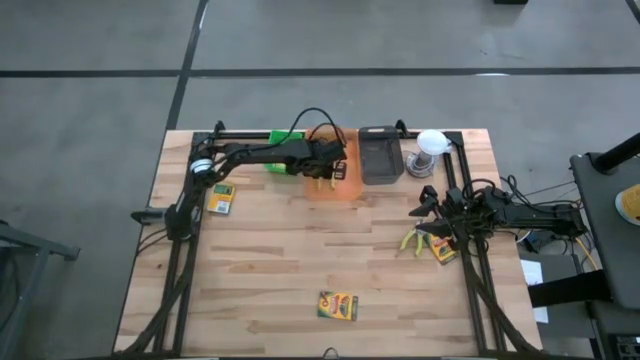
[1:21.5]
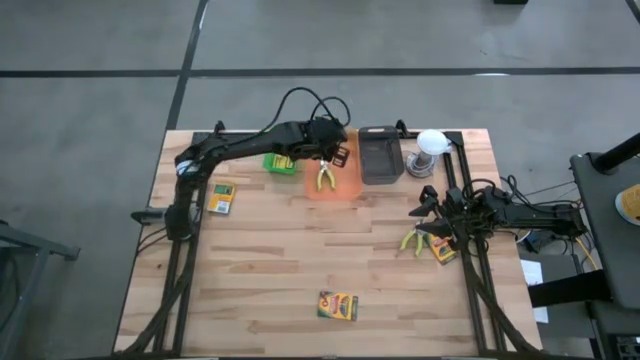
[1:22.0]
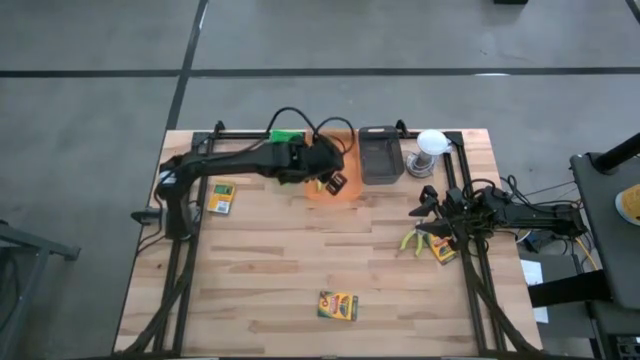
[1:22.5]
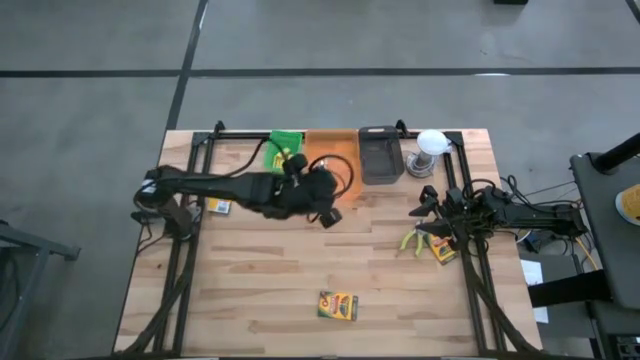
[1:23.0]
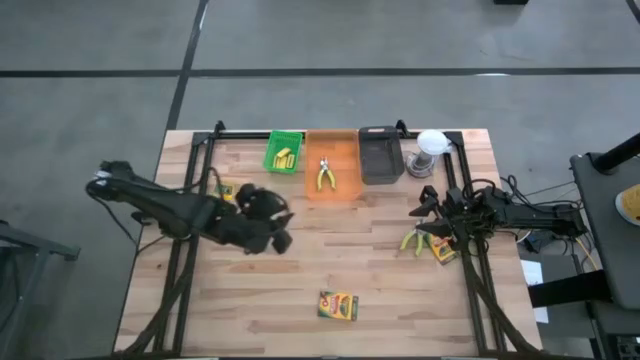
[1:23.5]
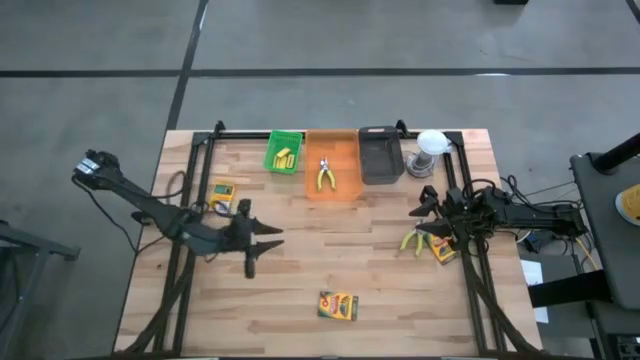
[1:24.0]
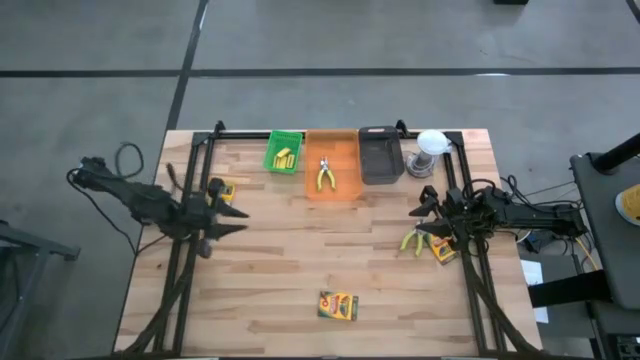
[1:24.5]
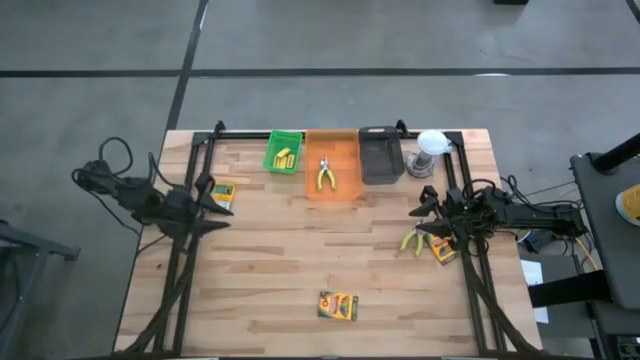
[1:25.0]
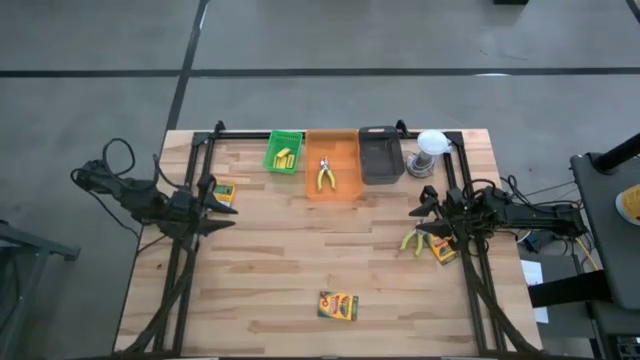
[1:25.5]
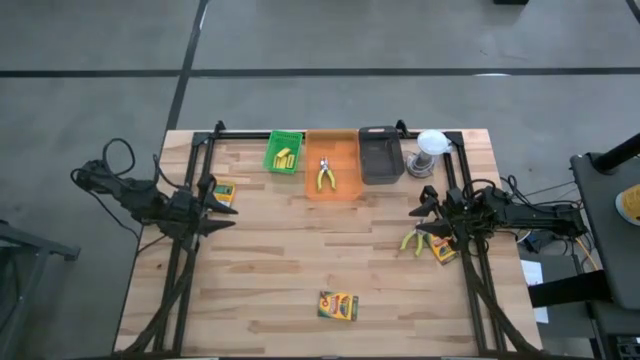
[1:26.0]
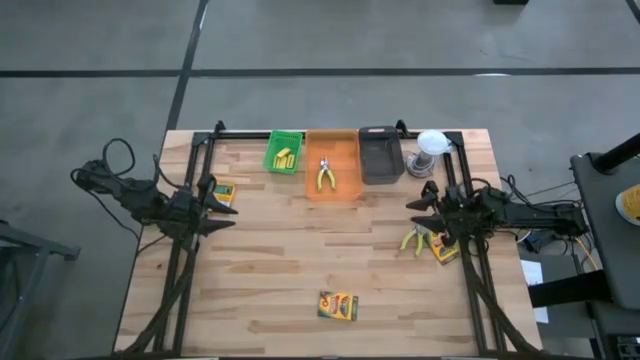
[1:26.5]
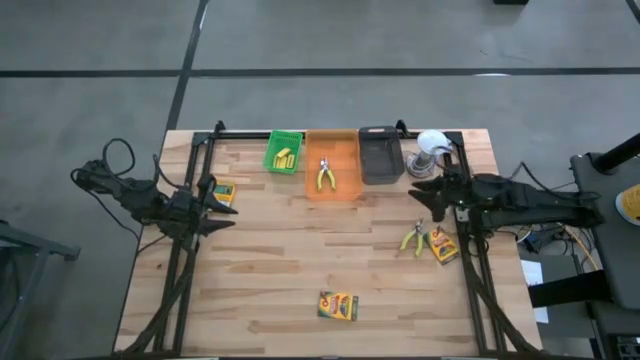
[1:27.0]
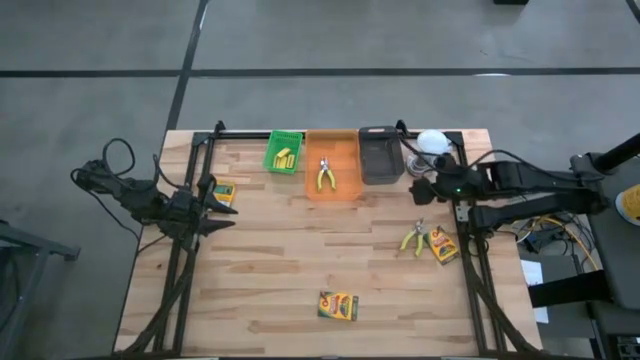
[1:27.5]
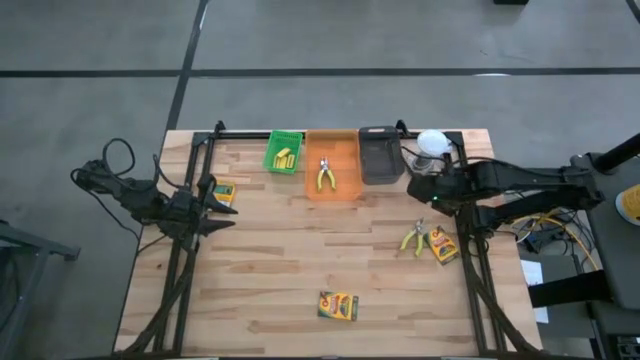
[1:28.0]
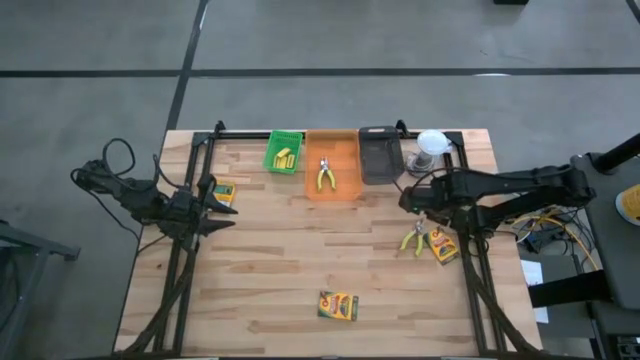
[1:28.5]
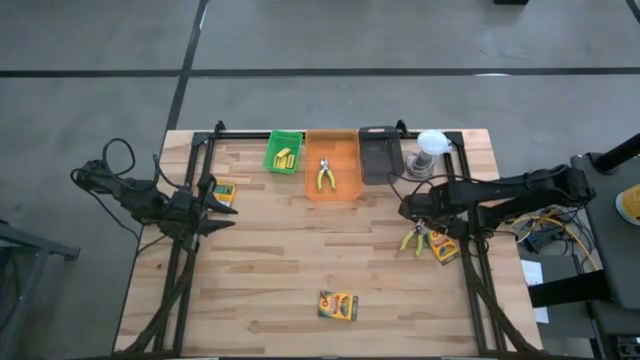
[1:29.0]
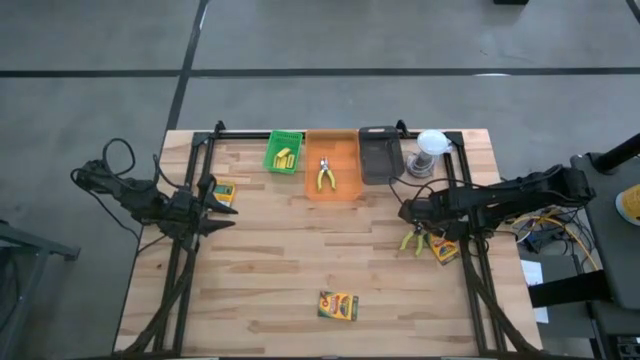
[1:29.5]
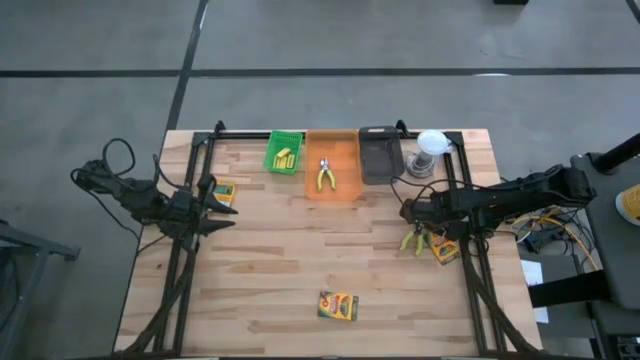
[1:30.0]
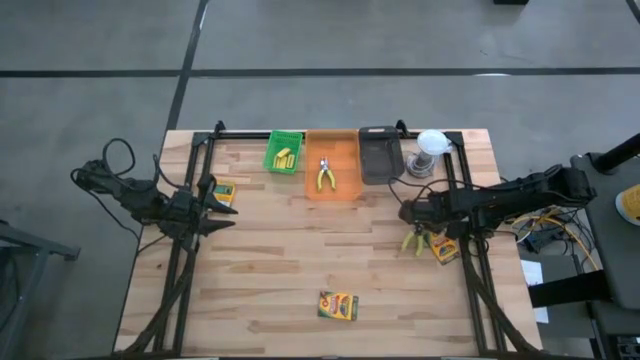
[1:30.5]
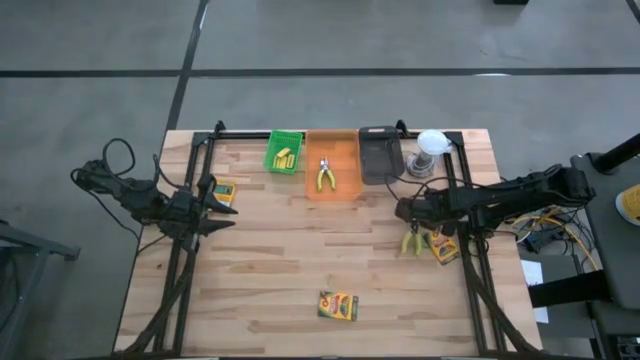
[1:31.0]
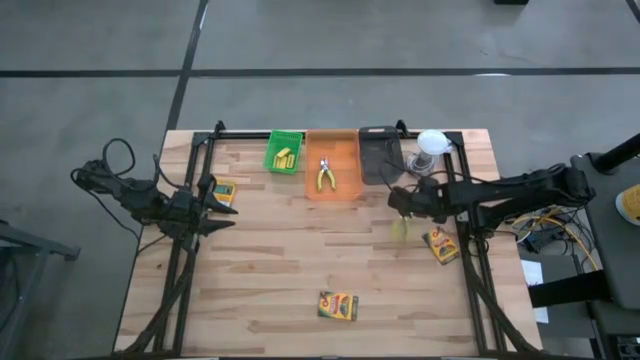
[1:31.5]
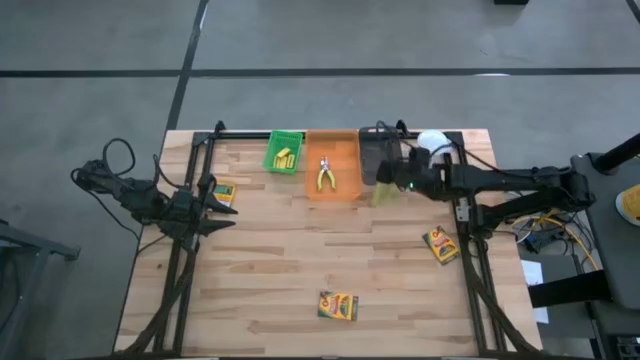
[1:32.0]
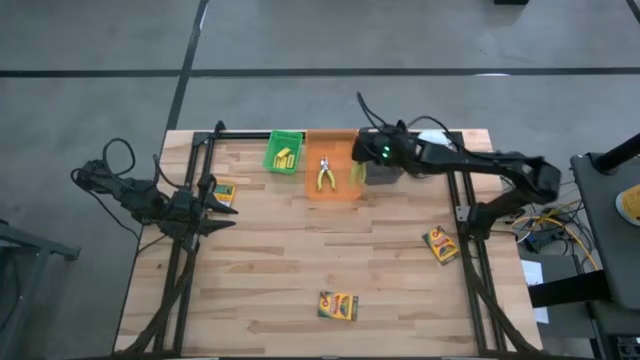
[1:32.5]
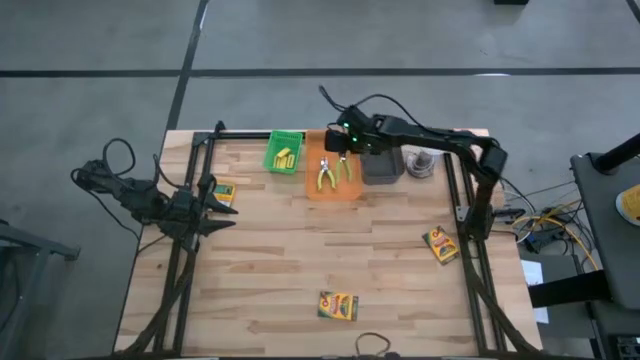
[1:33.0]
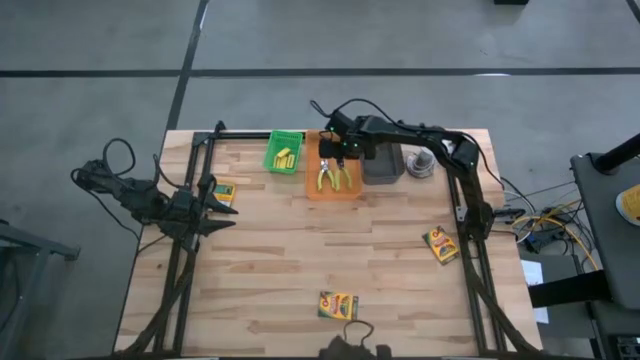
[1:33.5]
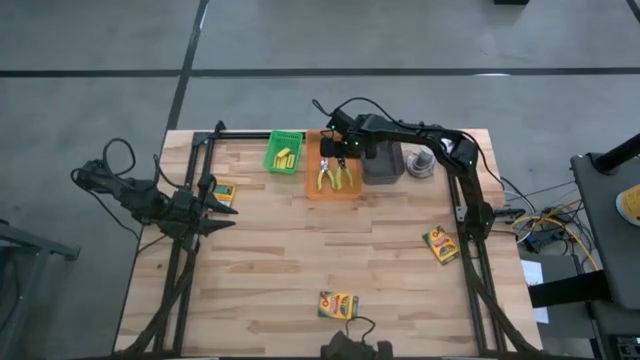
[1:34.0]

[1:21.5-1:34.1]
Task: Pick & Place School Supplies
Put the light green hole puncher into the orange bin

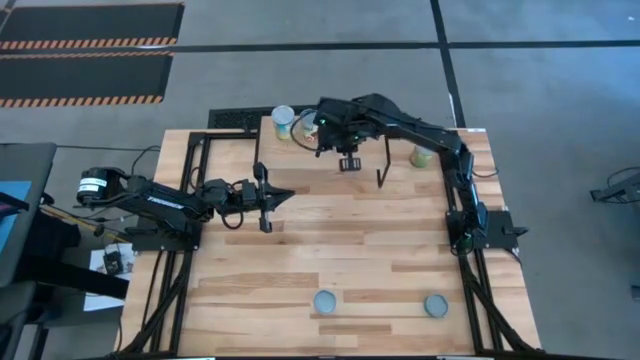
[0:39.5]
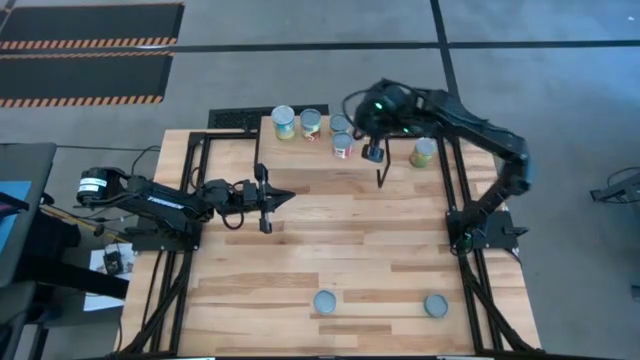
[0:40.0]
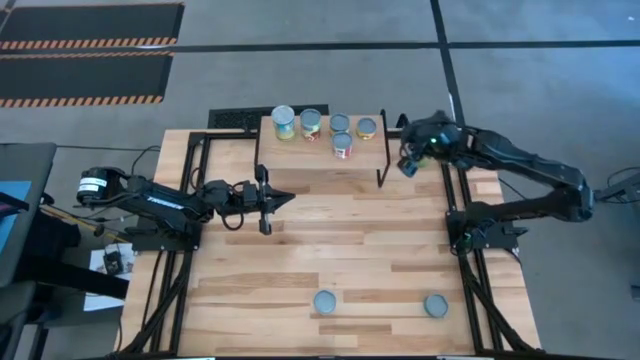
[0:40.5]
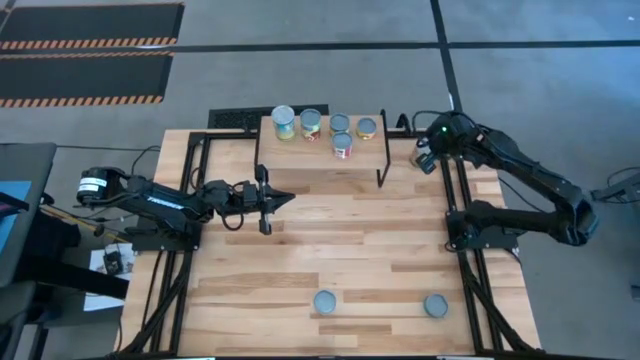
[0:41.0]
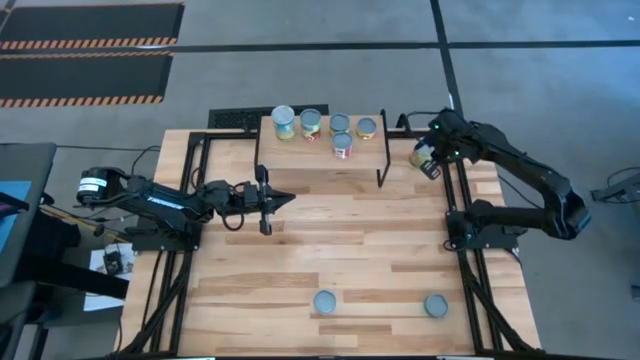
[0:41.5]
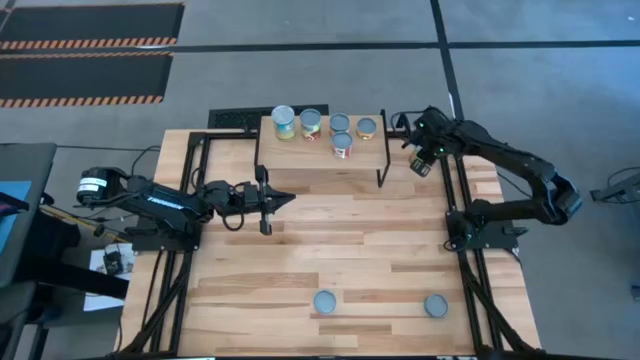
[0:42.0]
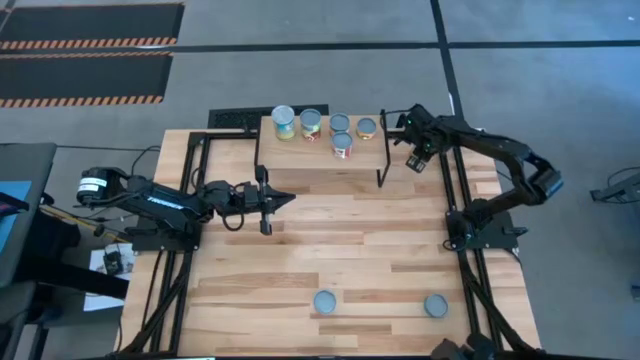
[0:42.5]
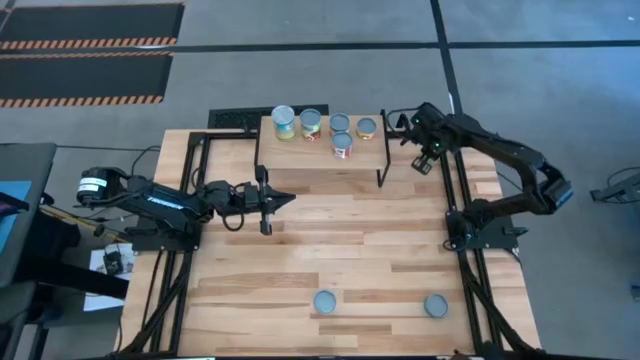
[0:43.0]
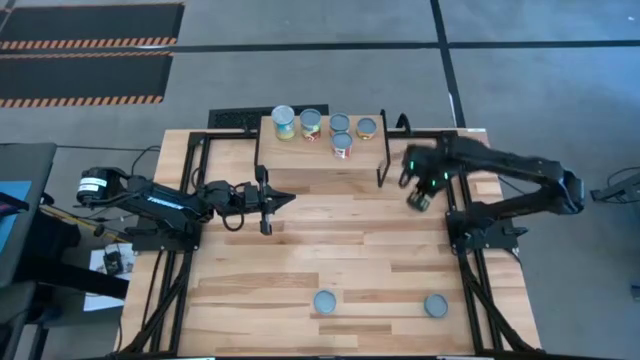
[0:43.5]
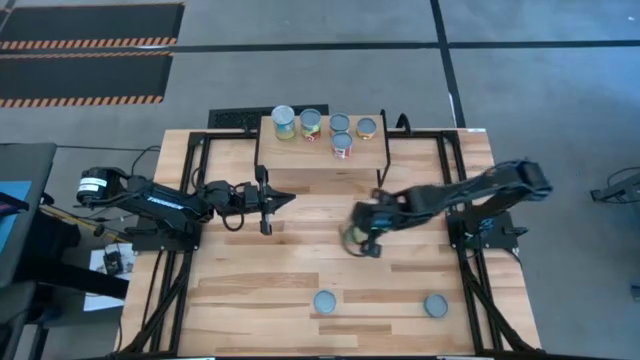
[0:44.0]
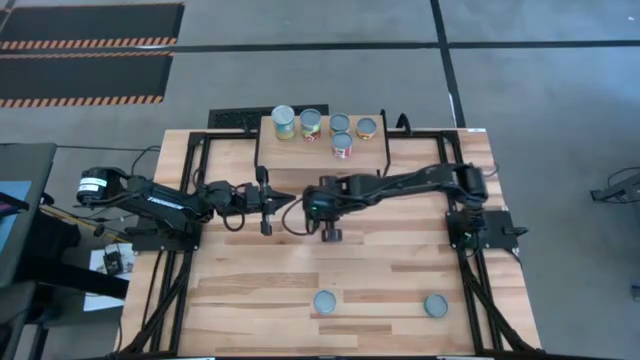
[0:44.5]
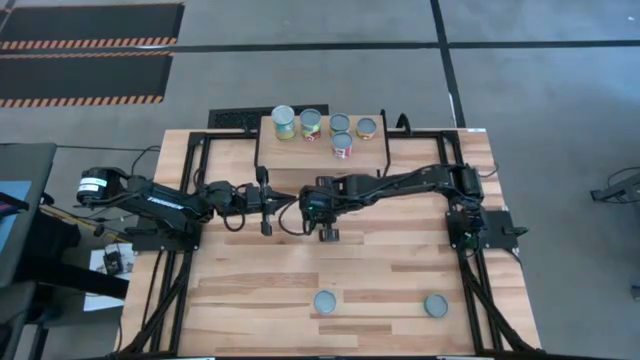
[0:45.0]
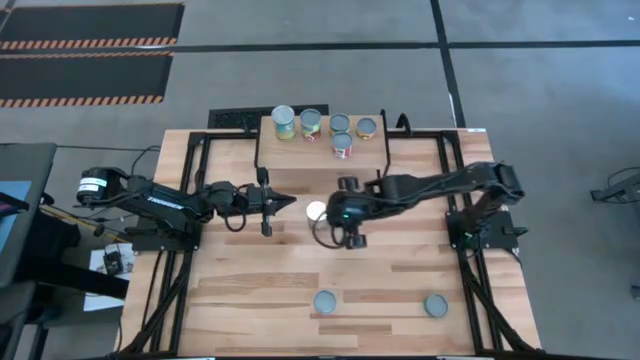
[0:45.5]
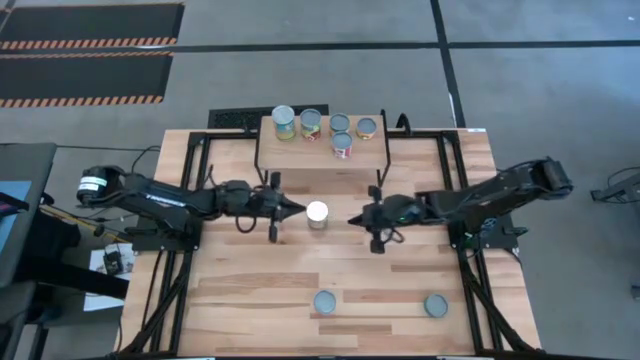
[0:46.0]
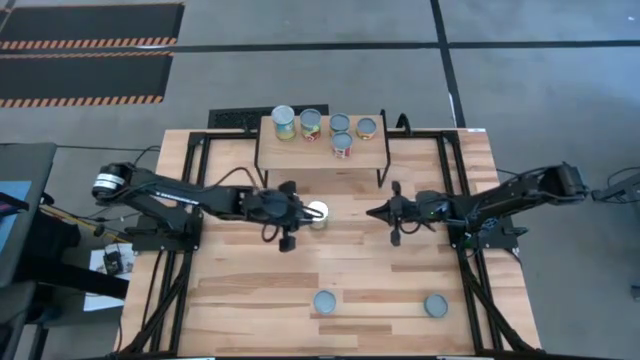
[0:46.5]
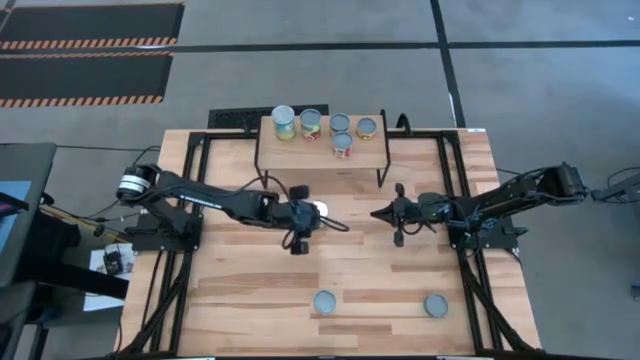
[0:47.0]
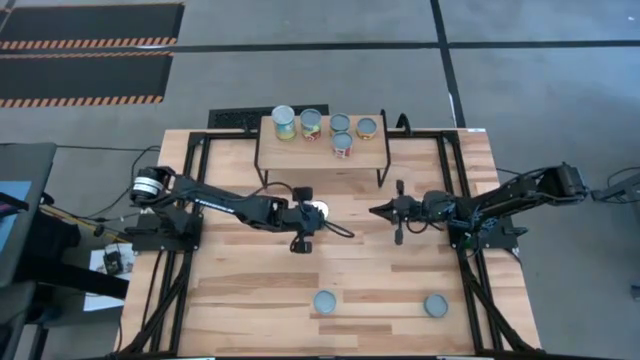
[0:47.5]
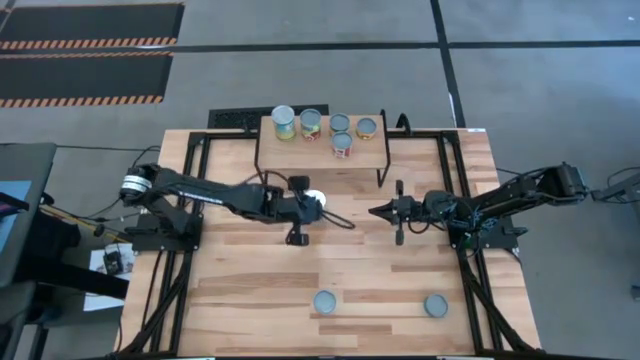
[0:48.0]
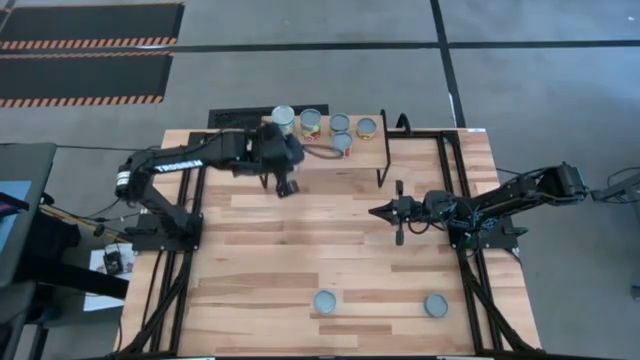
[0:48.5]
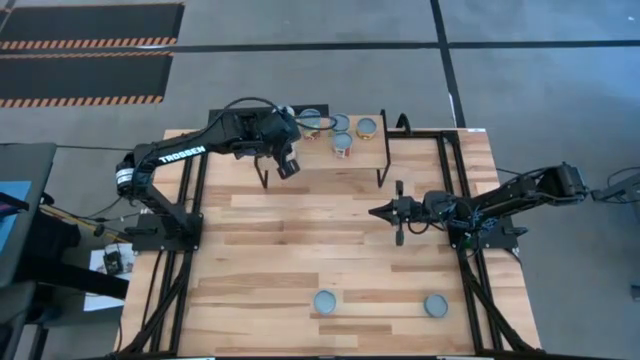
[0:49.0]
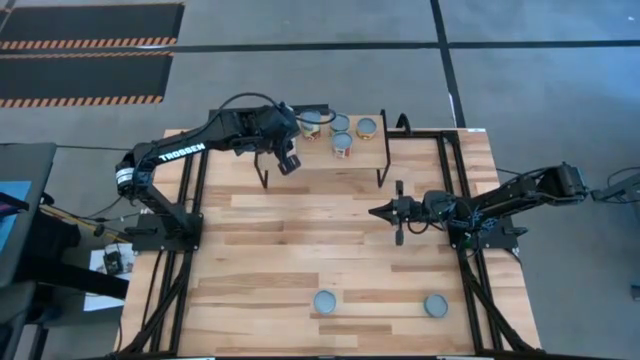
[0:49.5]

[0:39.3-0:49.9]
Task: Pick and place cans onto a shelf
Put the canned oranges on the shelf aligned with the canned carrots
